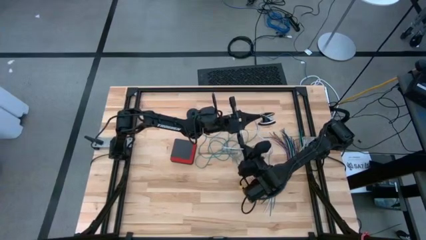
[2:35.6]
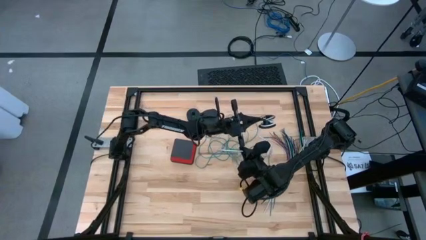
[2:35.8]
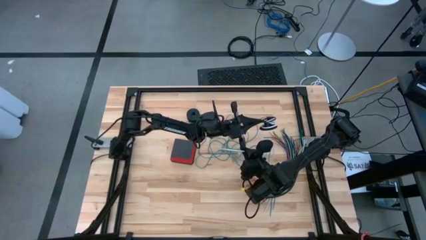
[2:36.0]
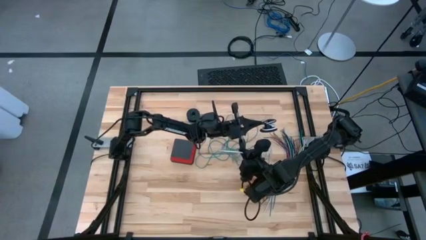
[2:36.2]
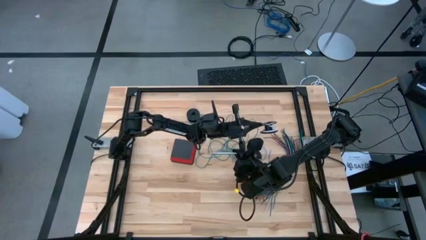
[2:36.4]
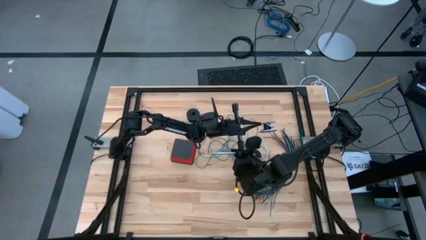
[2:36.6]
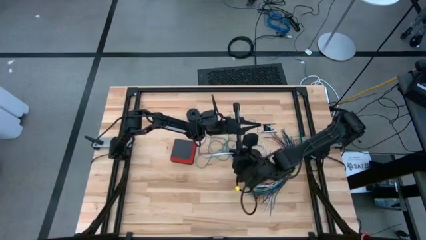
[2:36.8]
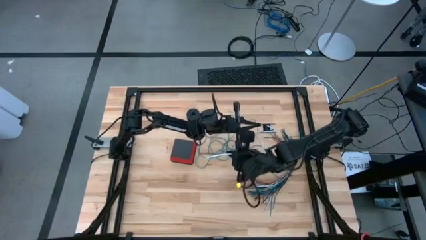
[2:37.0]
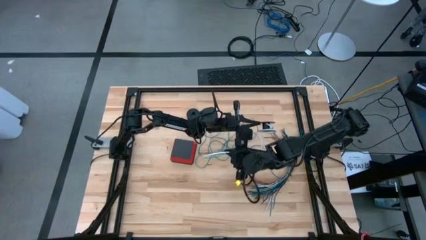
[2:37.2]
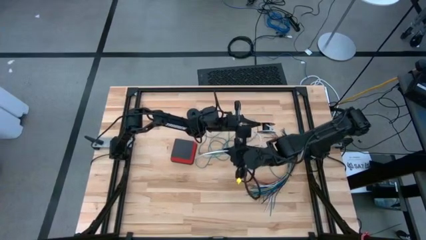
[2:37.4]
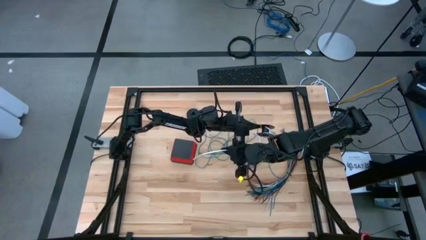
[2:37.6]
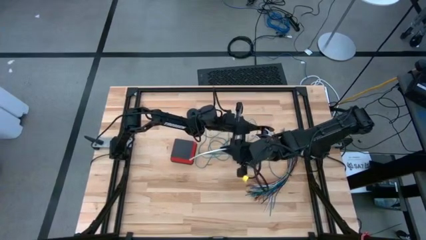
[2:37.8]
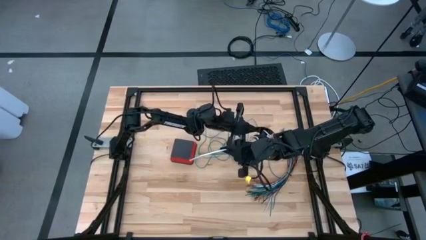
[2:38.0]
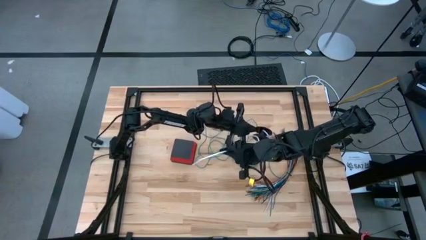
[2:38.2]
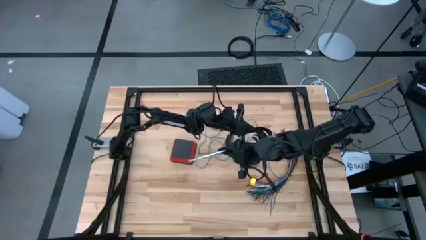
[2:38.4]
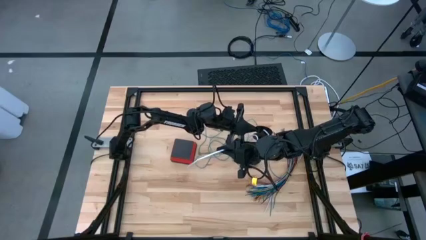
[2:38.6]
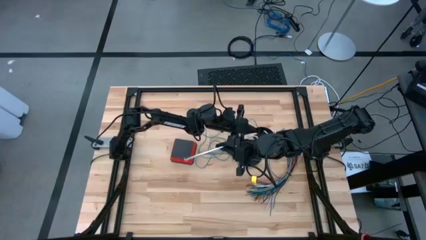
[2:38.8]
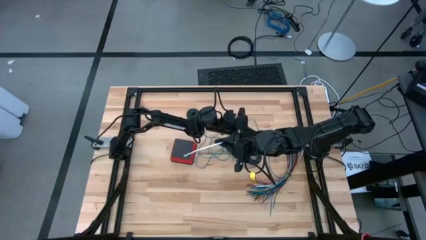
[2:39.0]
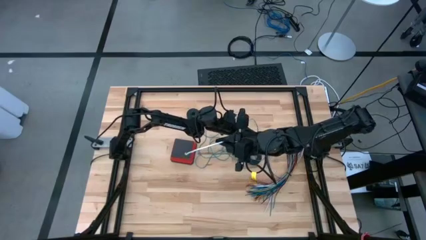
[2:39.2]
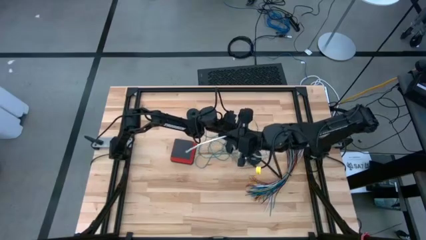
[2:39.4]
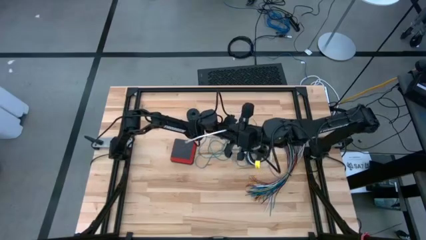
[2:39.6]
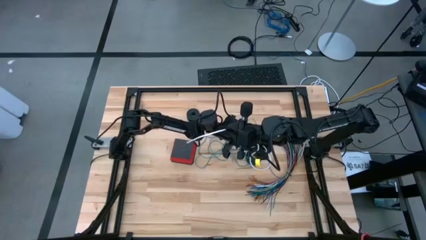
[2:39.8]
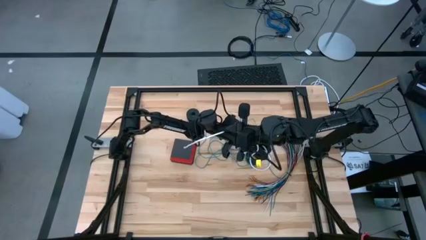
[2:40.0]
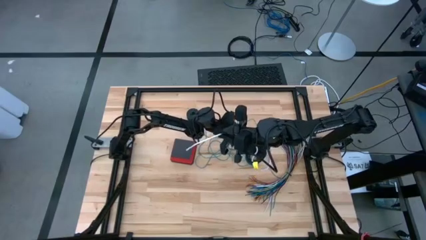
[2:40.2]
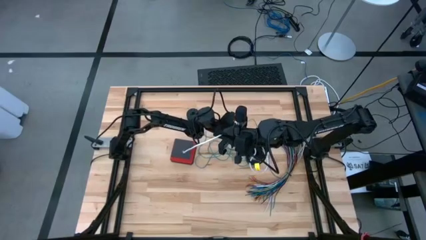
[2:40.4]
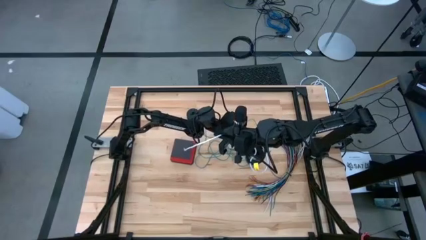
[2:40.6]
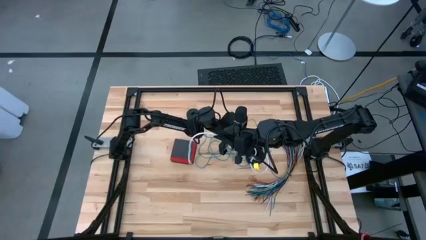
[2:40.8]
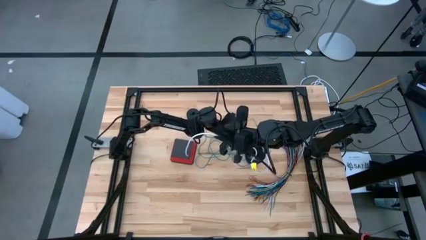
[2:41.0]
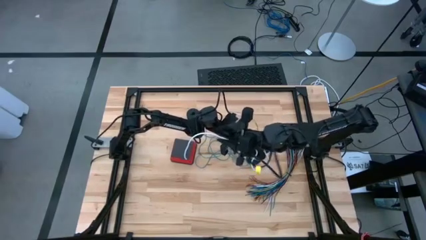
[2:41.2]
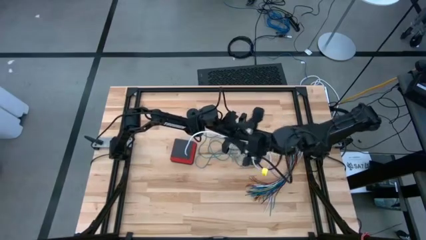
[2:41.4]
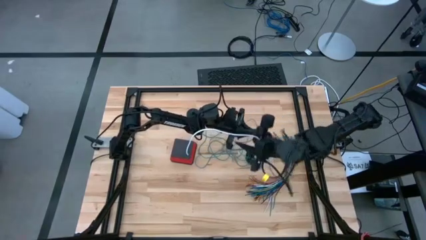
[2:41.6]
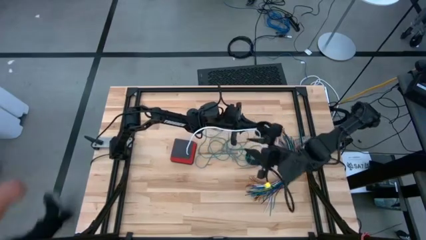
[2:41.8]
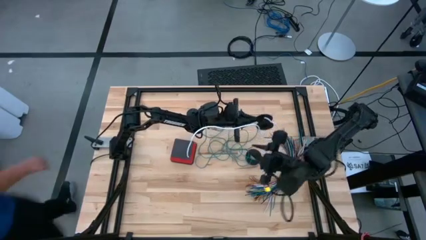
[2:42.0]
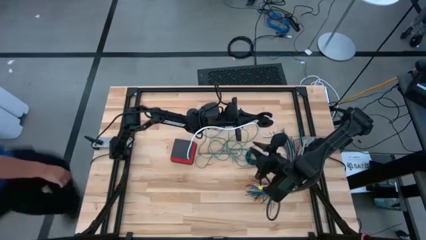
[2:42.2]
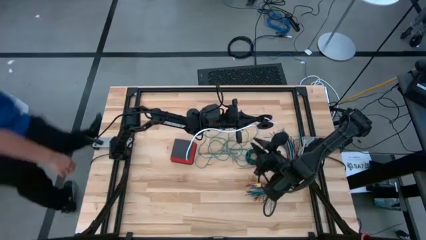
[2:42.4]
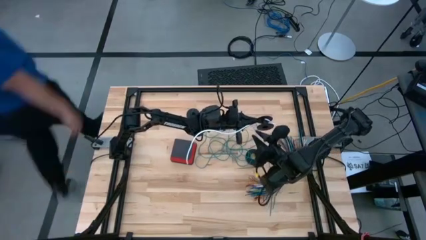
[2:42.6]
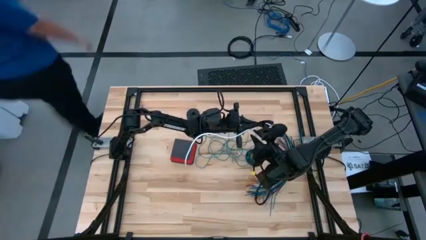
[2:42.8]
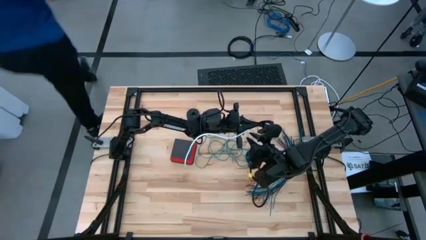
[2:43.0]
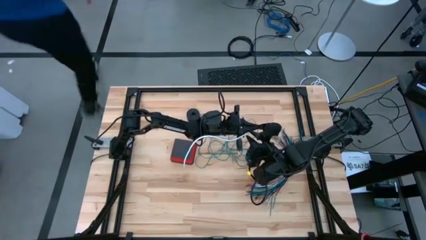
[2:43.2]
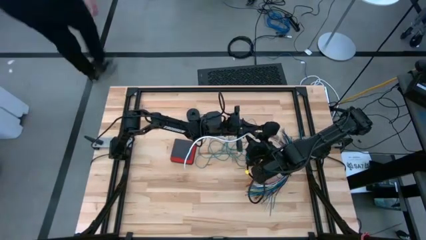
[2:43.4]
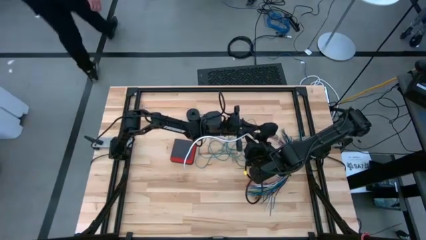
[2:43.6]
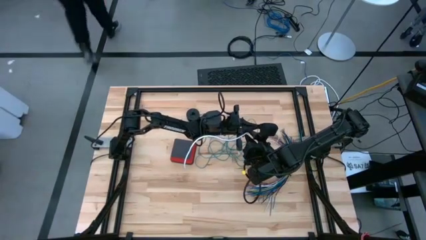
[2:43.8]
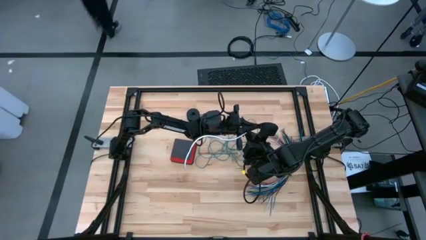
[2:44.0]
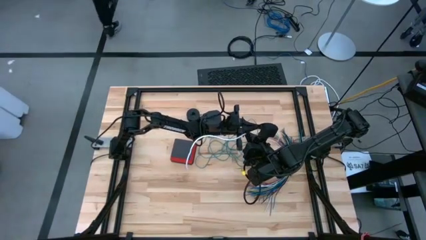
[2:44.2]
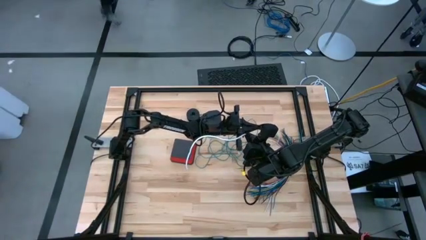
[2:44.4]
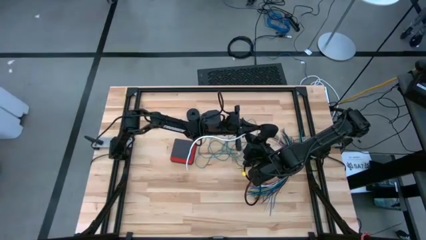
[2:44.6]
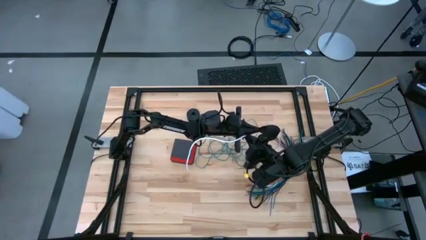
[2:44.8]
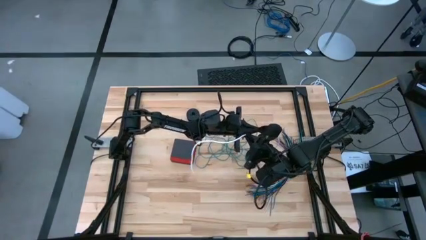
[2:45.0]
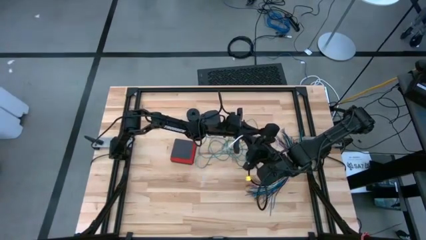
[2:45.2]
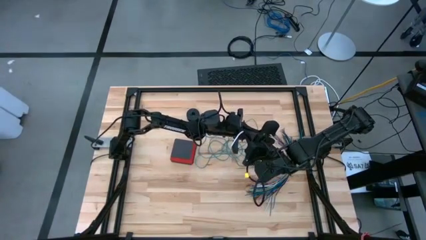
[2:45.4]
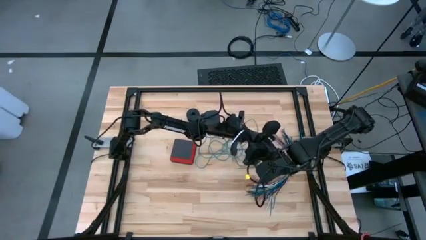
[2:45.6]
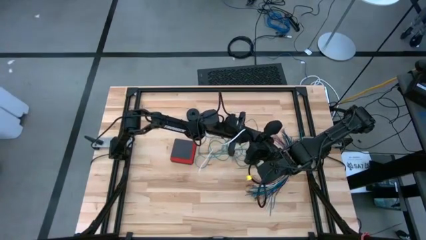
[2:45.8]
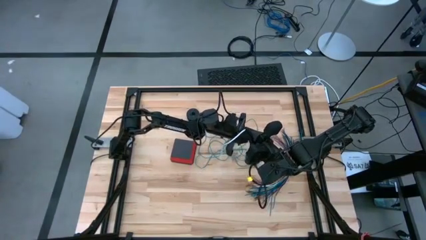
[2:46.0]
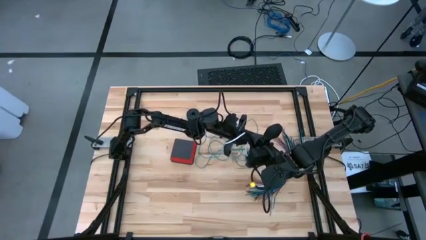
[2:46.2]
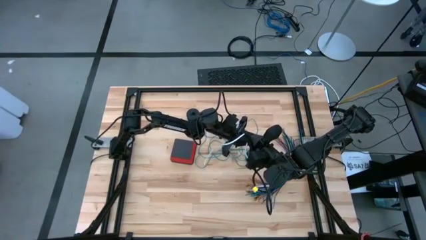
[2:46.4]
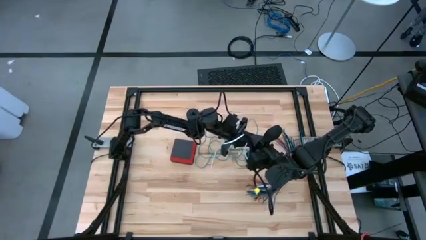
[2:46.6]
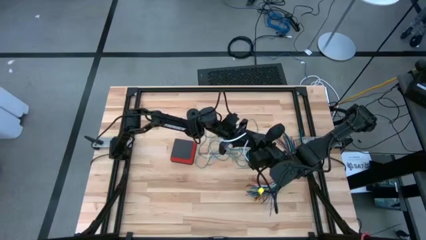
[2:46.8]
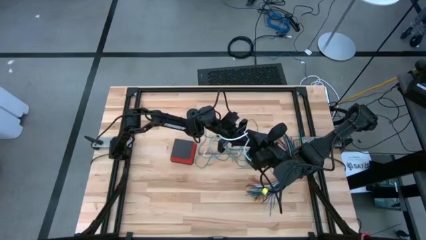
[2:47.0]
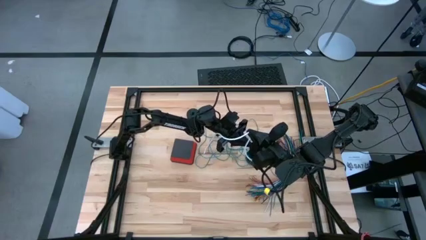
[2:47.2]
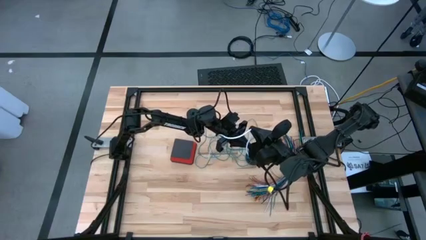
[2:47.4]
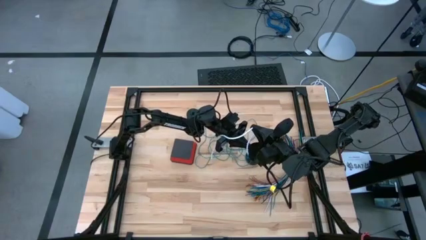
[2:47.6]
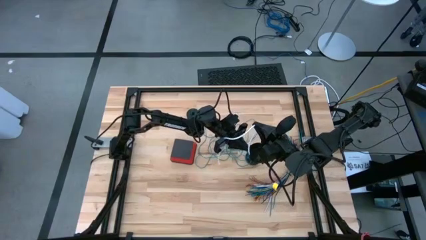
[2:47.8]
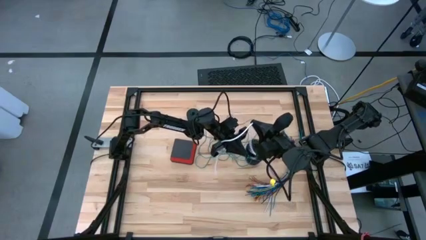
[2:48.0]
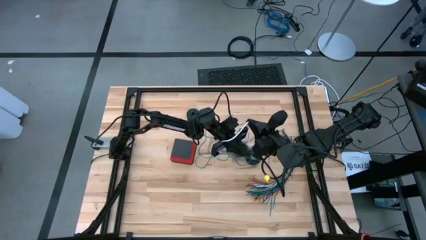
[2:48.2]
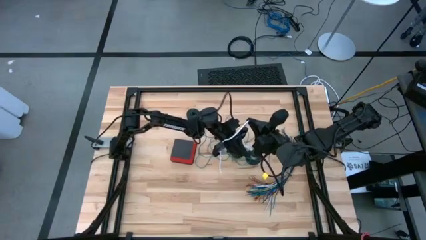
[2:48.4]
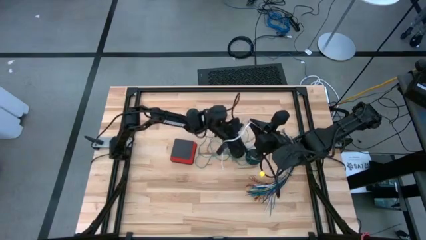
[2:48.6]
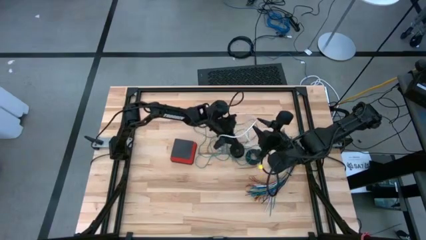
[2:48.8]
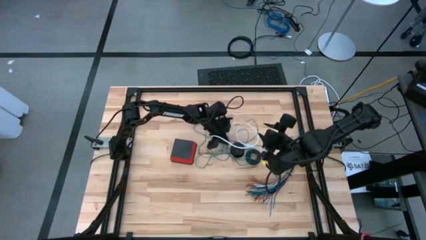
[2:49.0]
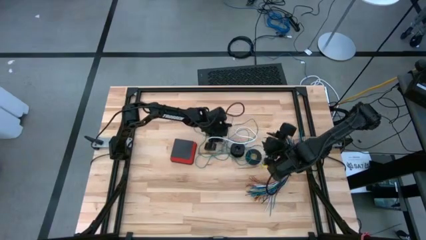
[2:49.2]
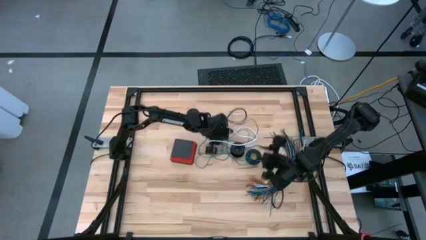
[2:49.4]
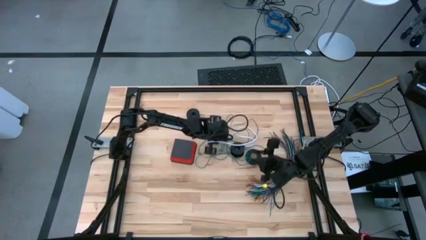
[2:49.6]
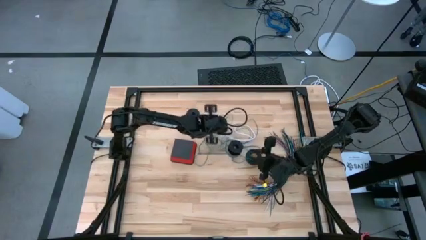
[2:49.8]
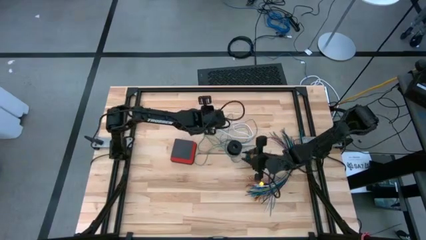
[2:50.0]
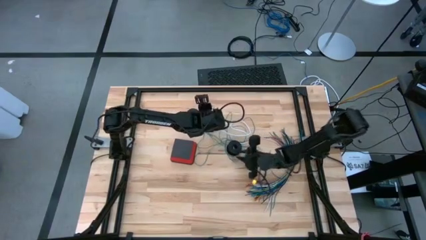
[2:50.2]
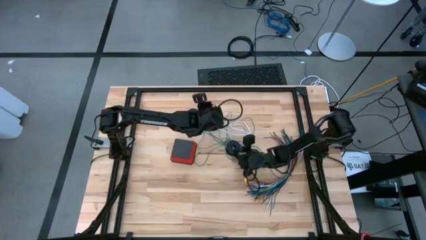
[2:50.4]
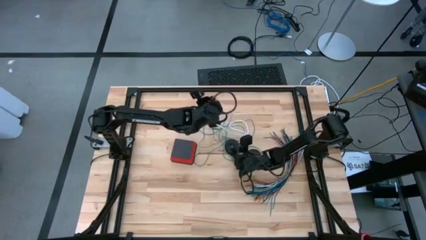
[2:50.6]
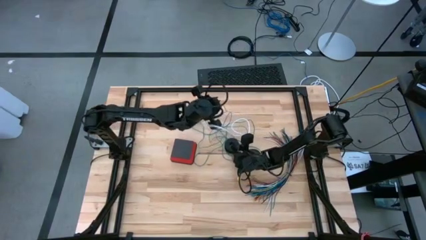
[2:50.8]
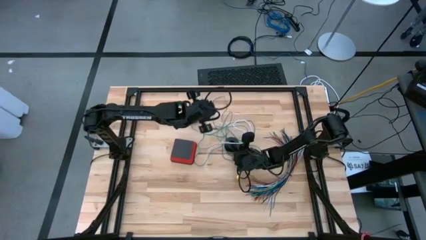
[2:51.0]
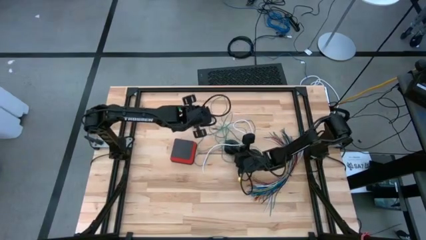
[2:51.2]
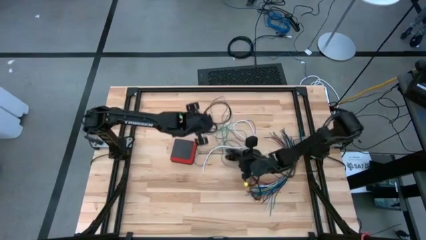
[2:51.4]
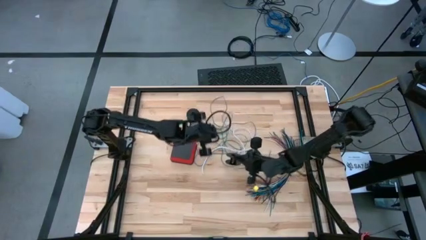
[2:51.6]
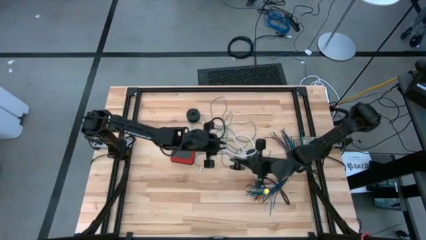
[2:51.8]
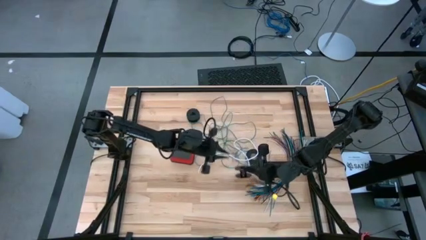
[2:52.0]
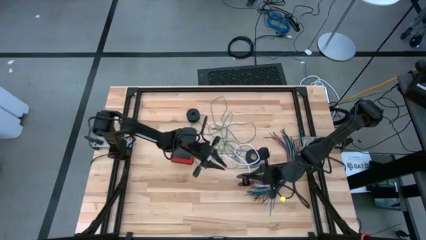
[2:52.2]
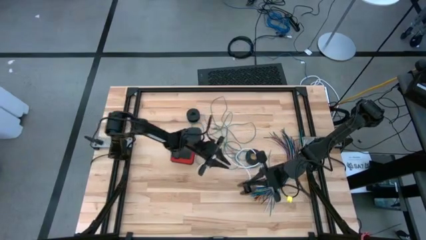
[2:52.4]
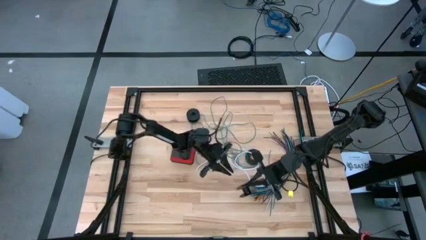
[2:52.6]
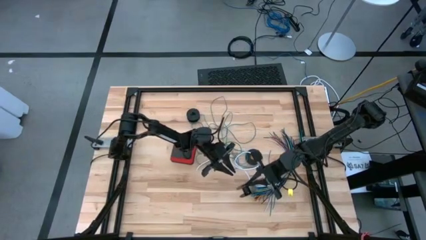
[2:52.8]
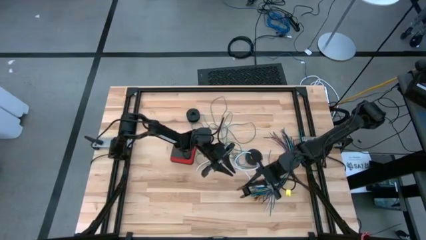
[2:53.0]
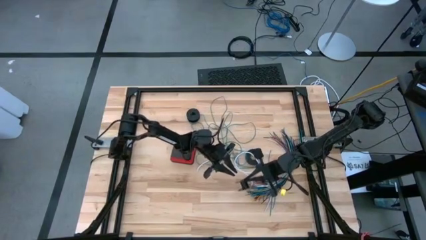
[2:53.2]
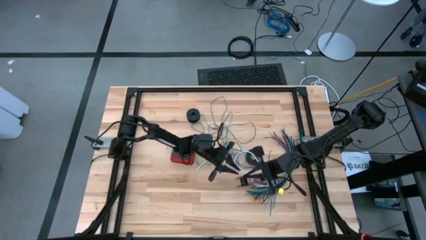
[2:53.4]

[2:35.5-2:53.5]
Task: Coiling cords
Coil the white wire cable on the spool
